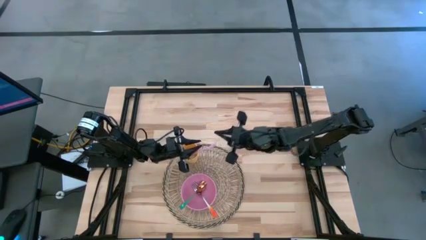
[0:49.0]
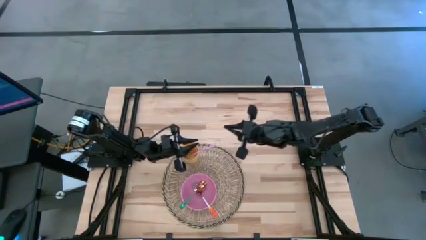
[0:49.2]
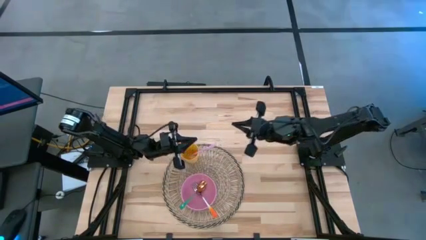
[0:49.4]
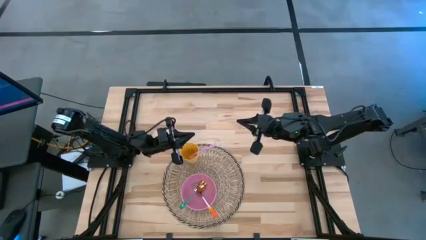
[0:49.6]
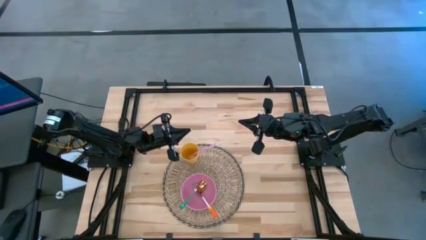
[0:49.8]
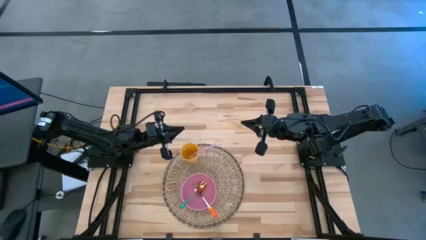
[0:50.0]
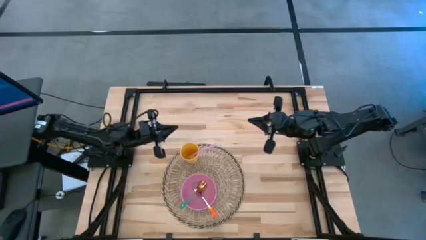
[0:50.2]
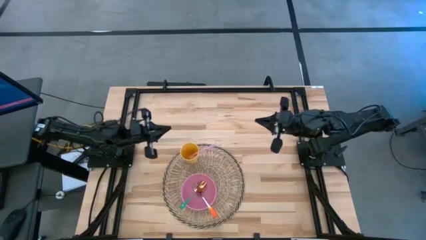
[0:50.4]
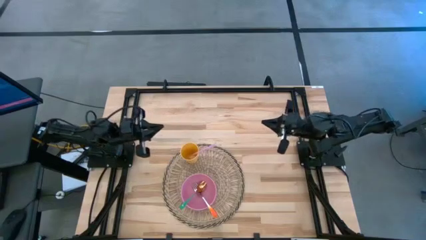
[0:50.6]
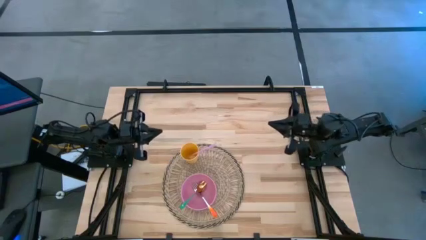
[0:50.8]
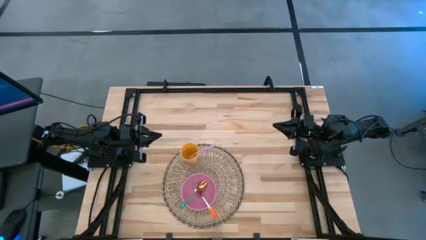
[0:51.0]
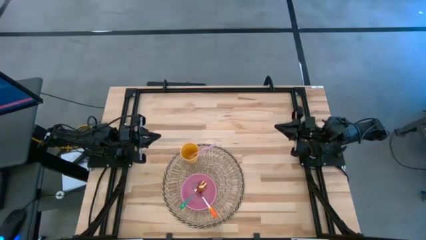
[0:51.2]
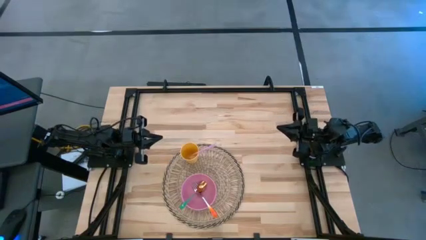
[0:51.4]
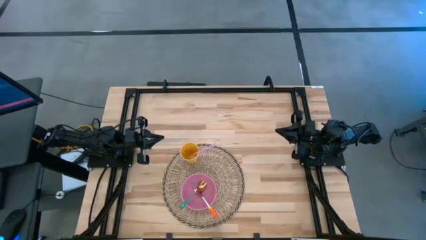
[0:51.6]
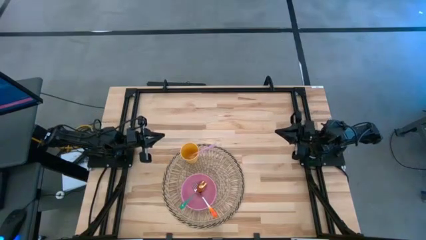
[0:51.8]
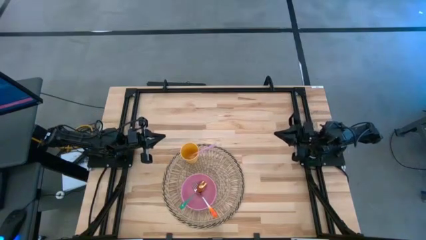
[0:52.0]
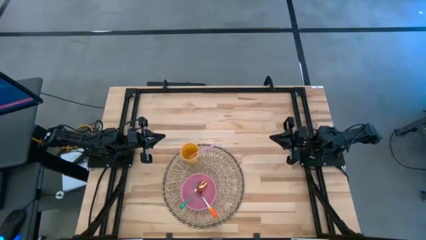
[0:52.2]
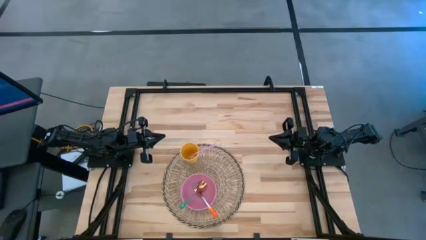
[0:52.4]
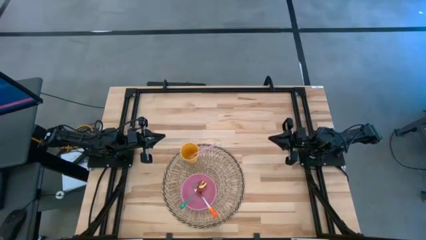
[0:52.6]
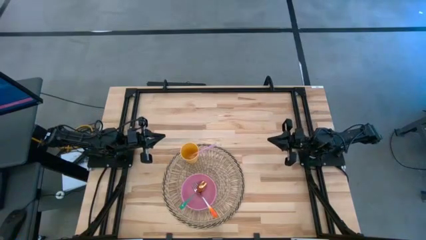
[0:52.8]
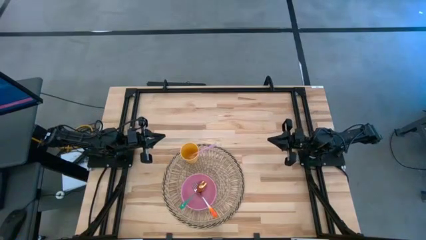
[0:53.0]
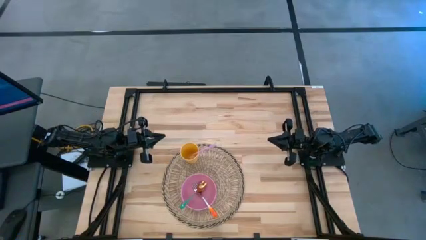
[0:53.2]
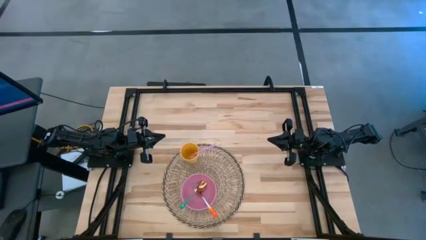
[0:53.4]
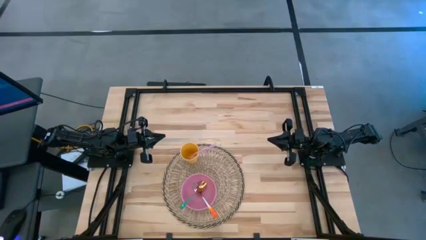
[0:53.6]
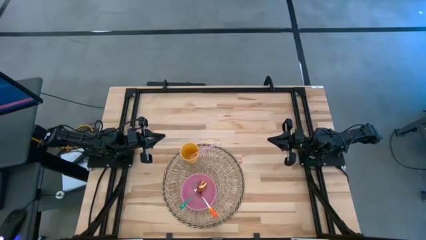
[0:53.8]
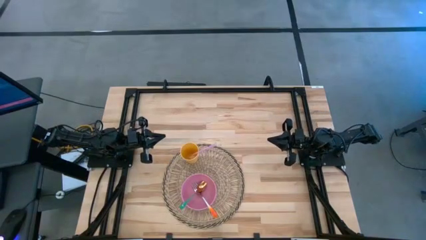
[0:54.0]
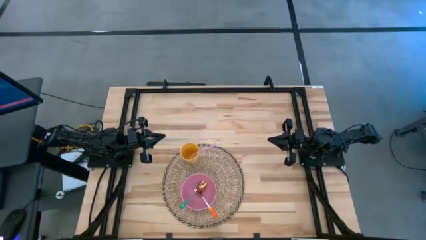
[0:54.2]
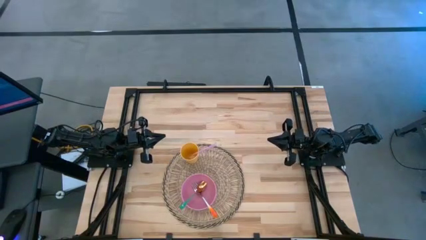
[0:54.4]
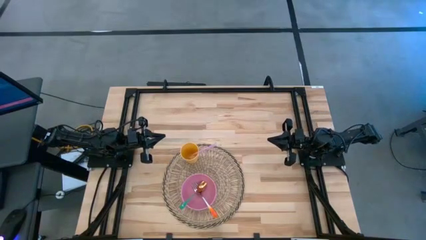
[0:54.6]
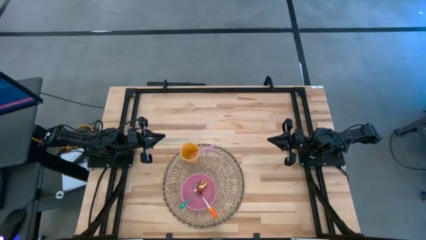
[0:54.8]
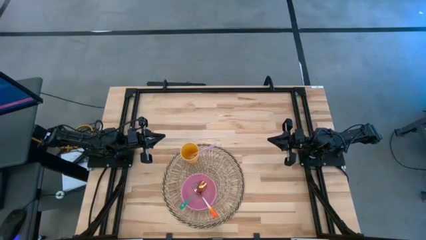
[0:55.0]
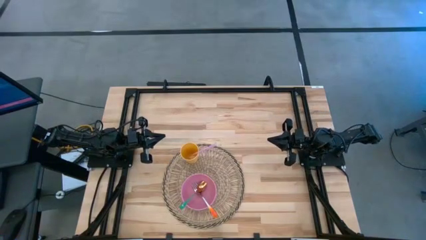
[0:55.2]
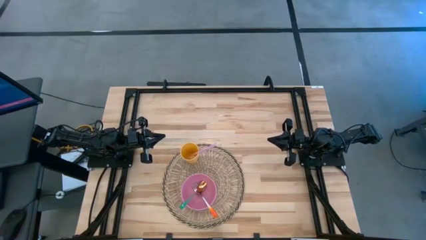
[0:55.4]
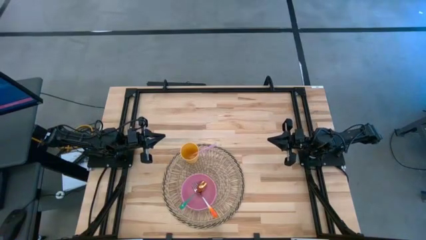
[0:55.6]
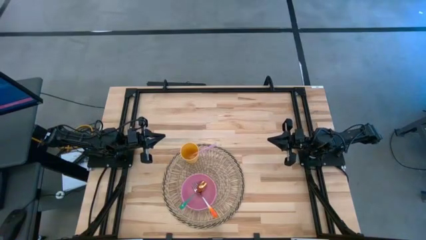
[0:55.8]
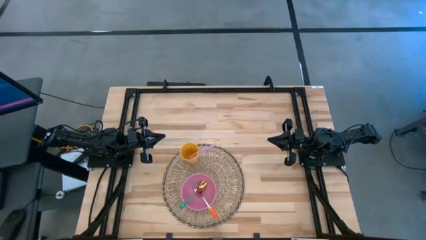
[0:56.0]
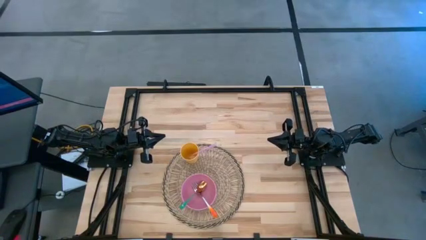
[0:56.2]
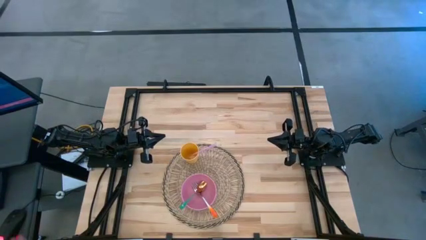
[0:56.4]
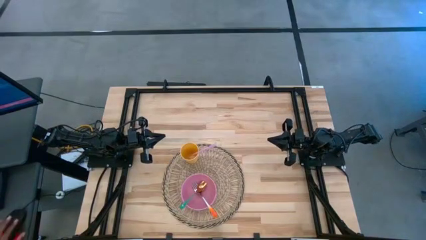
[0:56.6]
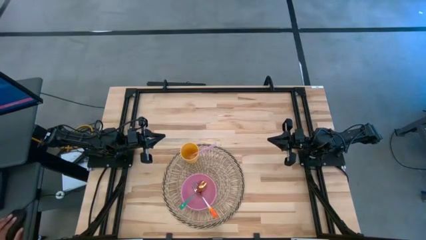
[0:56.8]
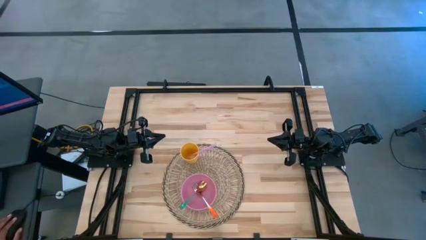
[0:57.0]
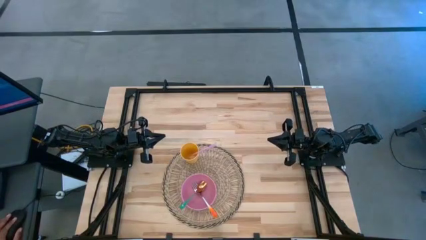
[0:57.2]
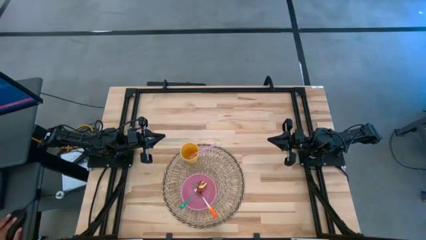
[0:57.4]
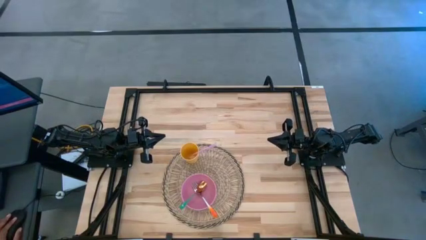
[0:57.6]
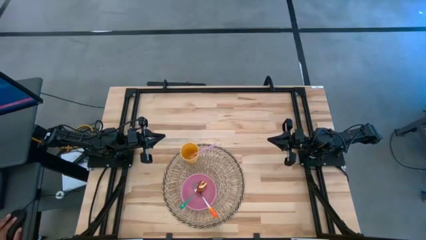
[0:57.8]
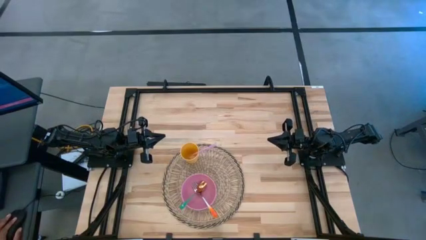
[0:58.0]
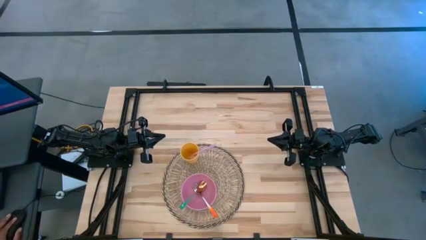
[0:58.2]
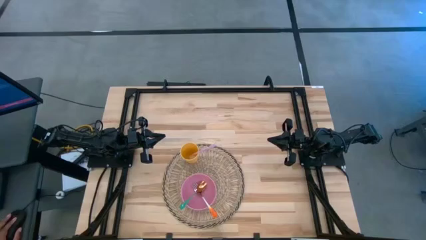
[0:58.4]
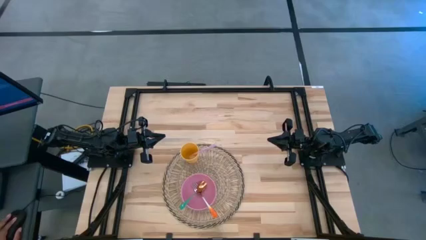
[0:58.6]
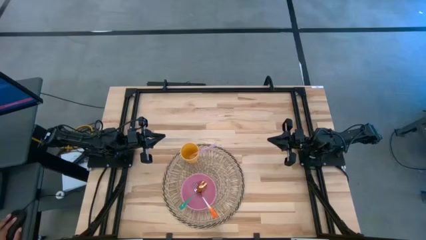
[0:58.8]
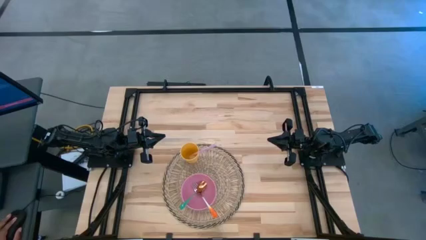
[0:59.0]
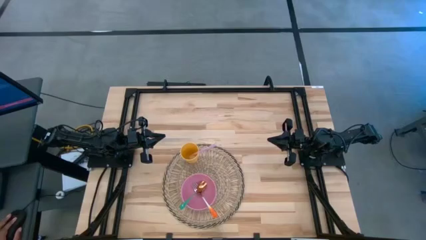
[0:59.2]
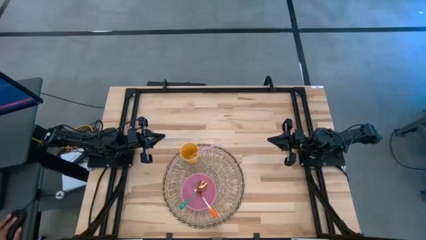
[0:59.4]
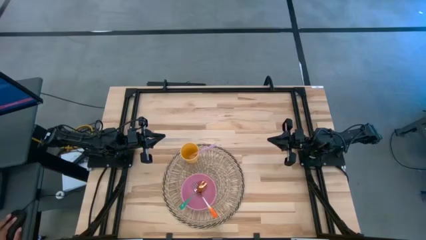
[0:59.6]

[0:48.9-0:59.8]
Task: Pick & Place Utensil
Return to Home Position
